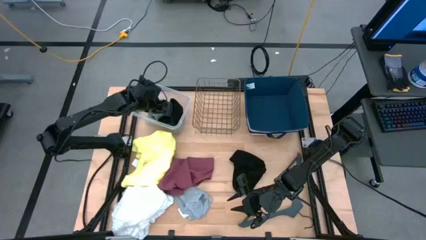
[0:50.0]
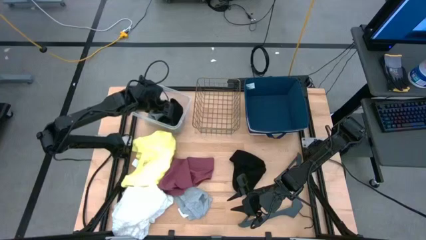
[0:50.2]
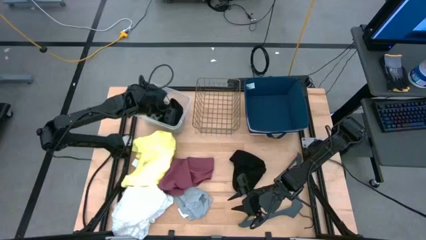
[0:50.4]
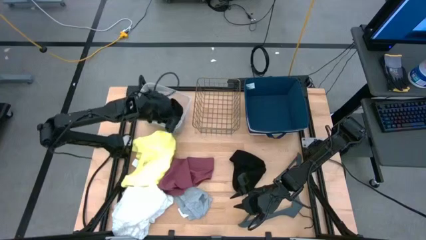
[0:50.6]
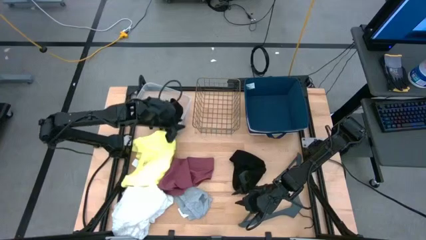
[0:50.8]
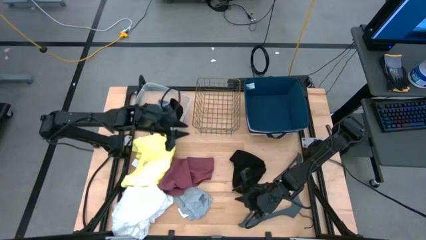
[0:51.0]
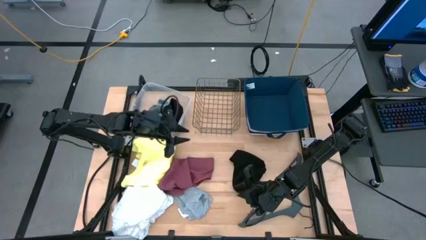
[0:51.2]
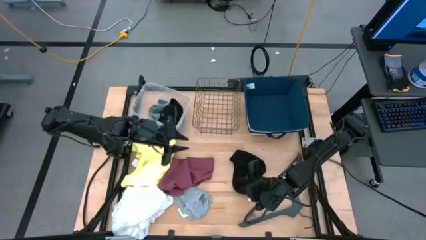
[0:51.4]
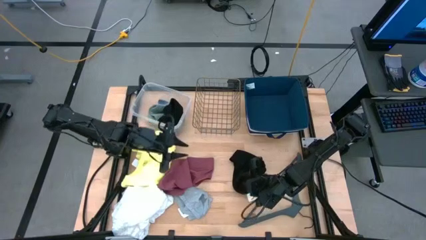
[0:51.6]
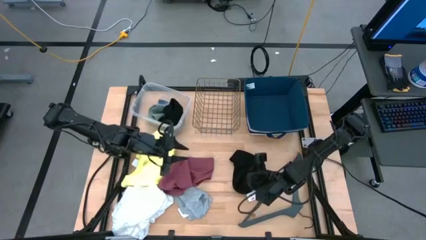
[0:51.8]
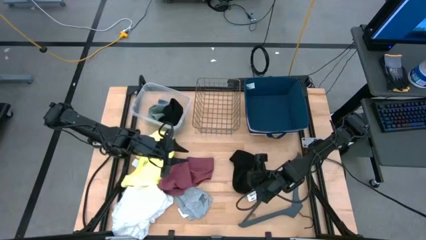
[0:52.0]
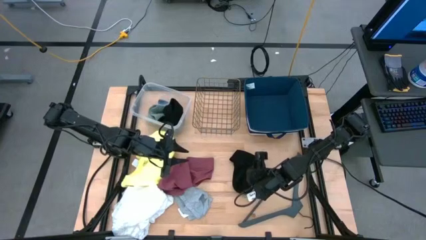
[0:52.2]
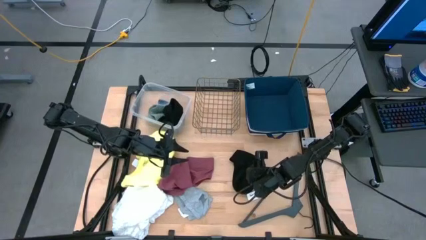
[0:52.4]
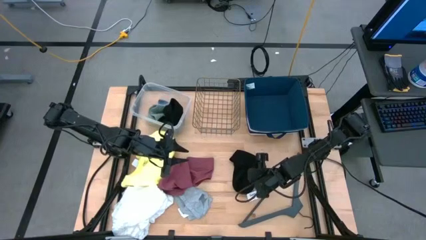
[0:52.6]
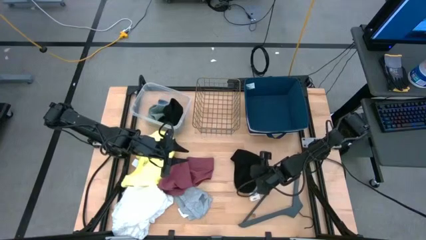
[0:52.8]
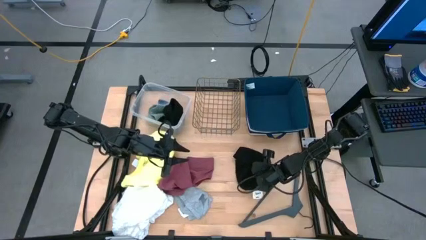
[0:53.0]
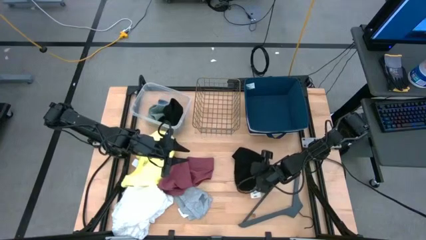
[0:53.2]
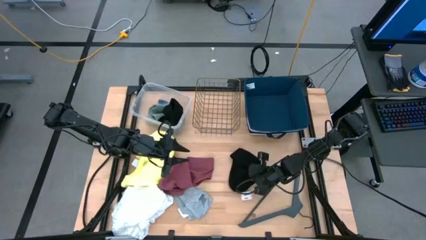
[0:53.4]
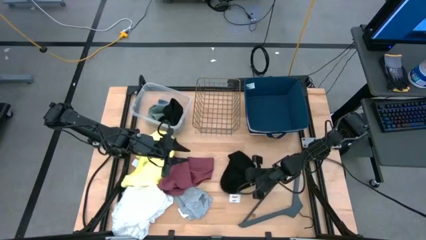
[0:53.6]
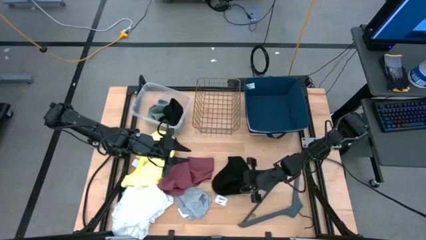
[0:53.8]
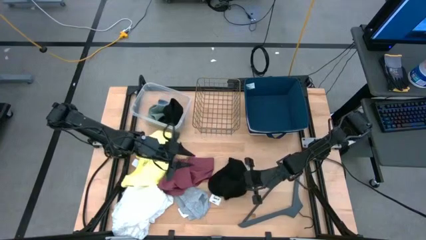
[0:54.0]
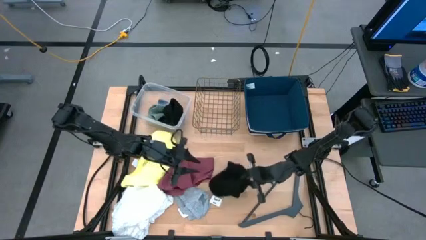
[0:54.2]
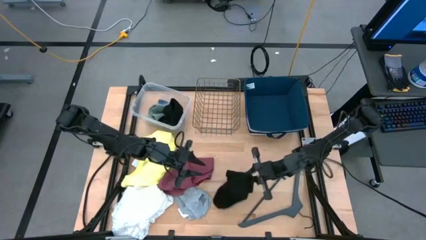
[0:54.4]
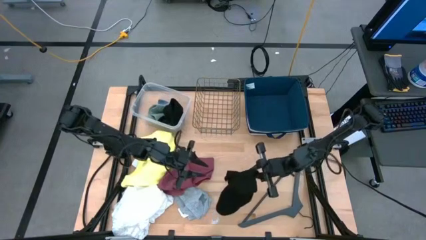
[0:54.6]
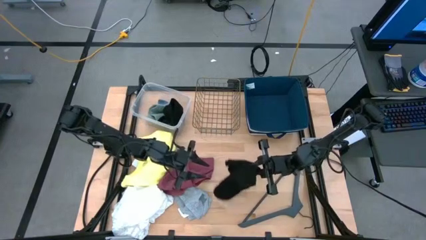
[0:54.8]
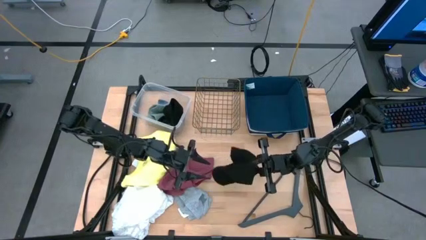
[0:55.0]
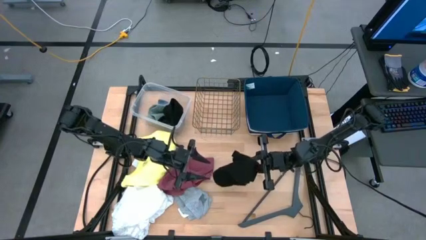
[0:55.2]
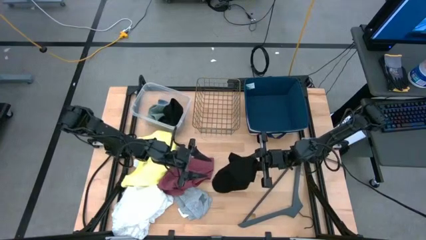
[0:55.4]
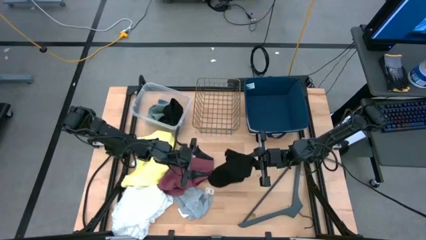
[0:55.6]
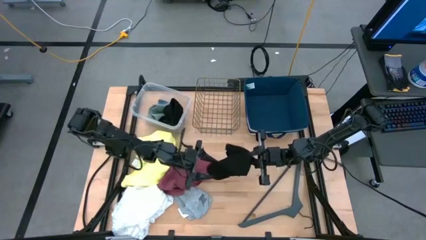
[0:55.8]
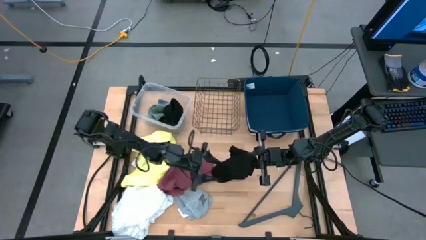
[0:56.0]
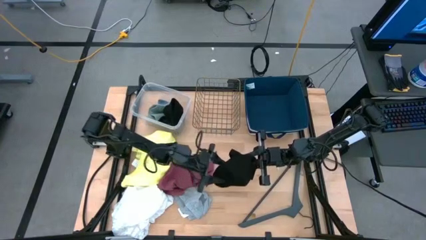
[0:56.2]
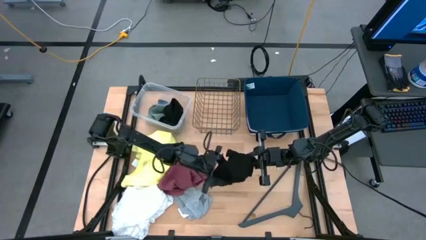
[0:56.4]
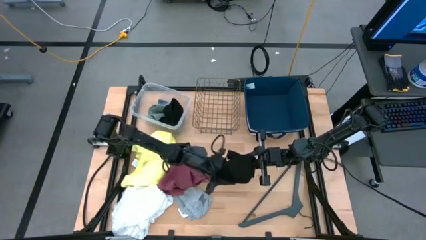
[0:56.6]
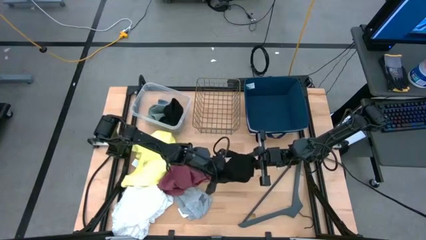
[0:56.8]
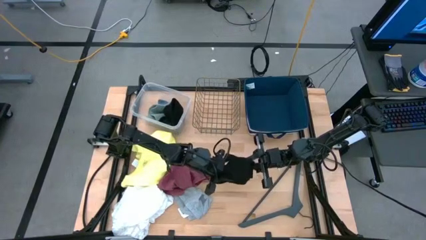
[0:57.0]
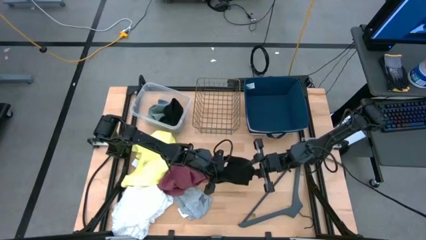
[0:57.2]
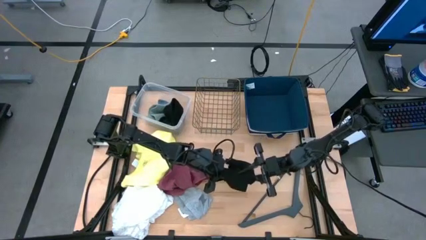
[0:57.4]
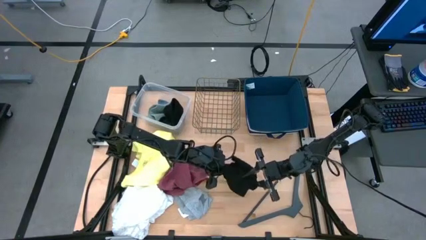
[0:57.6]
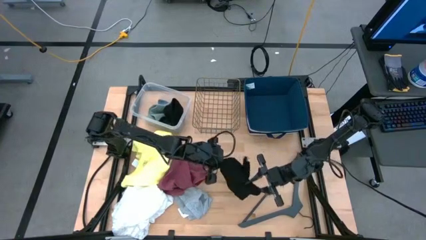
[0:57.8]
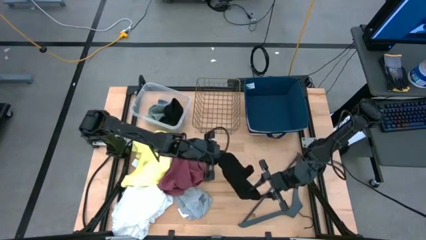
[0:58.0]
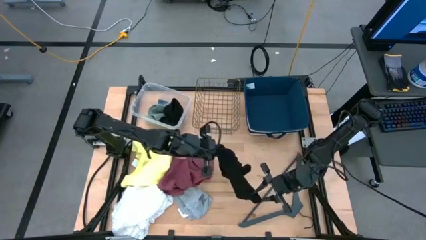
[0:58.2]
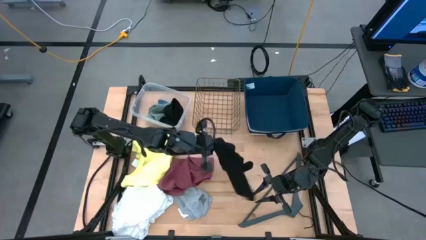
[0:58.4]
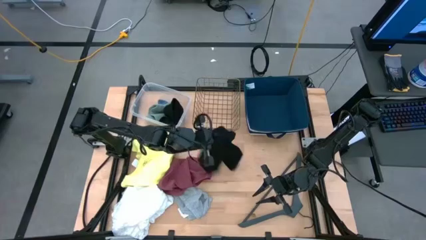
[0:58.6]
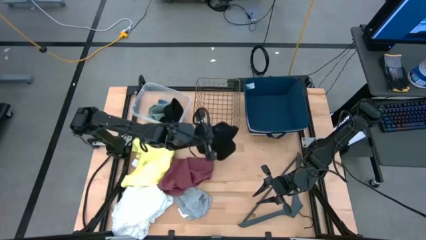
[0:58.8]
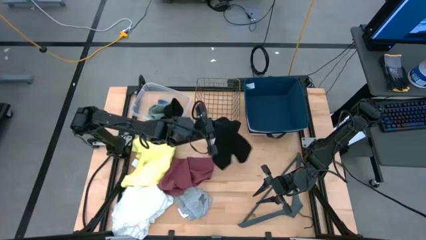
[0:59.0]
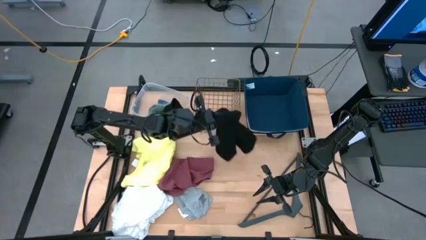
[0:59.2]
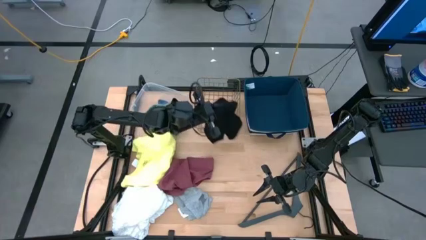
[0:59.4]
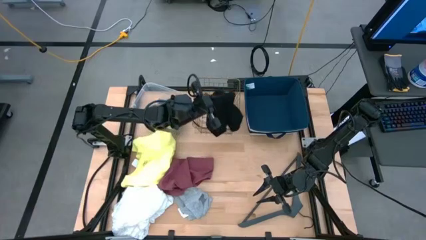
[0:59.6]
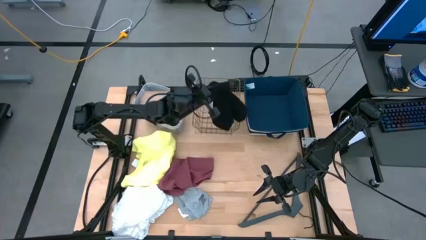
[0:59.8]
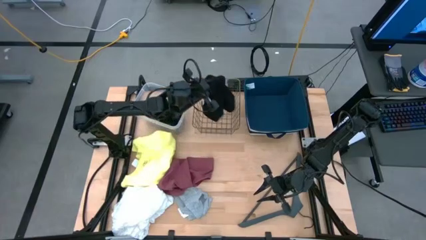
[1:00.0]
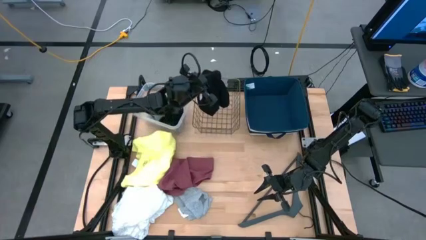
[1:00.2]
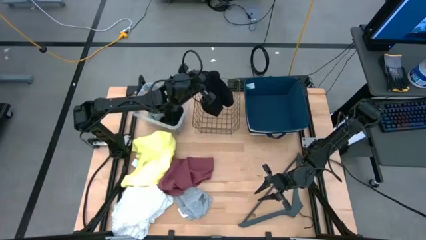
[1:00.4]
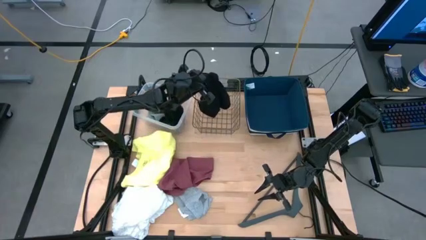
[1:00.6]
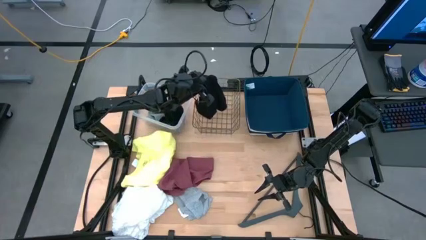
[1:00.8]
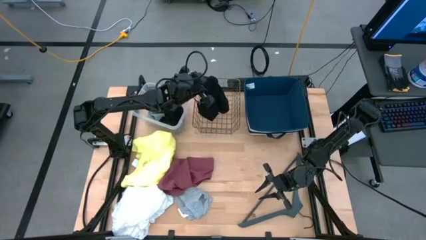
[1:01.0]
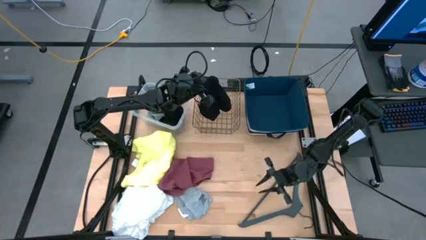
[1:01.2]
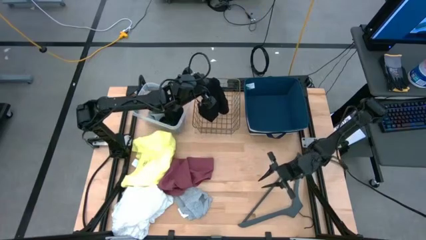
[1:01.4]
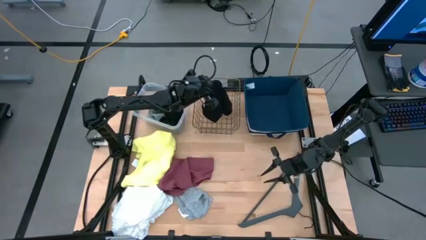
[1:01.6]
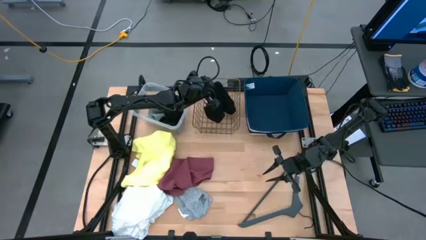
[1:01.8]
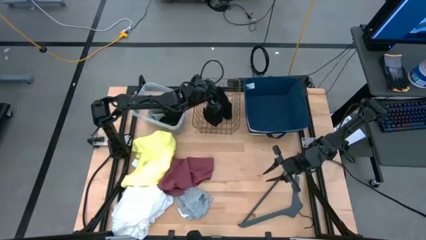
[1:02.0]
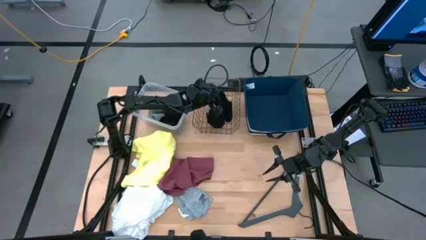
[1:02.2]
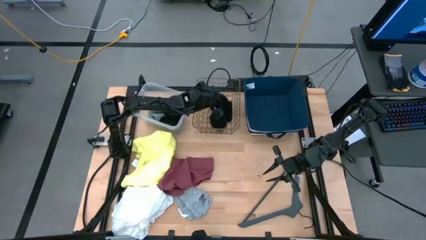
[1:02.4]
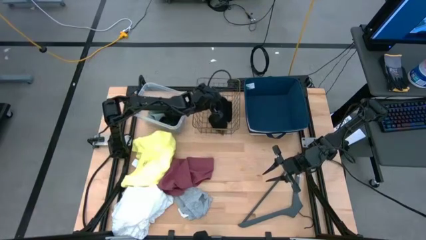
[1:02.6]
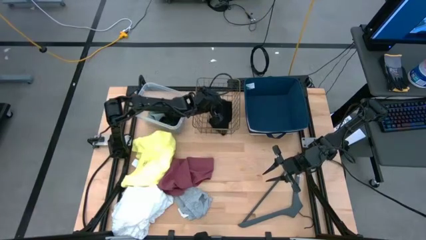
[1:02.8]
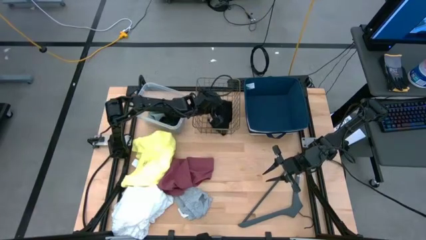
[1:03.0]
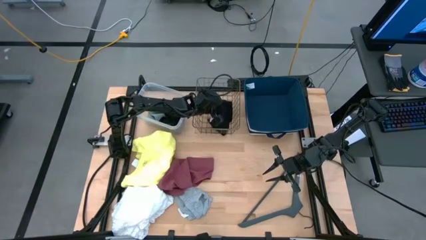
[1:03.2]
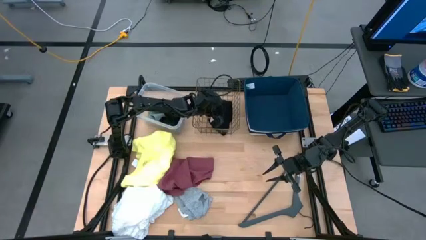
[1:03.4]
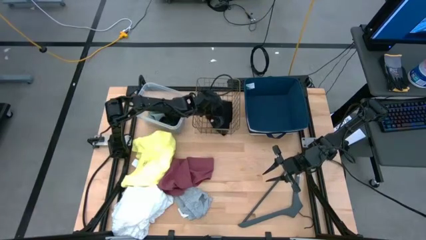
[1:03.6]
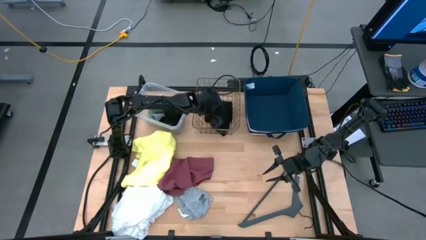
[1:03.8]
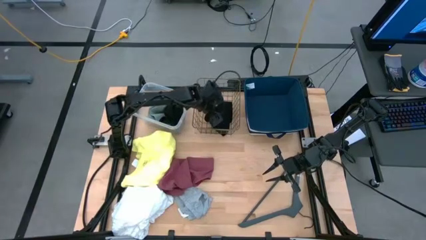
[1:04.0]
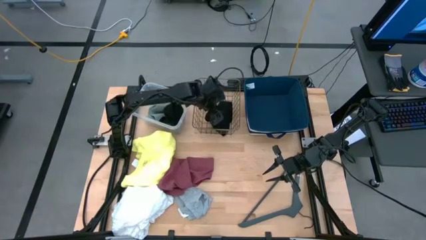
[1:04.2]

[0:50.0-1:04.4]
Task: Pick & Place Cloths
Put the black boxer into the wire basket

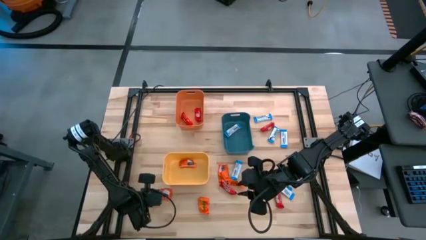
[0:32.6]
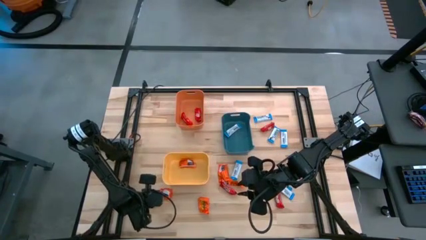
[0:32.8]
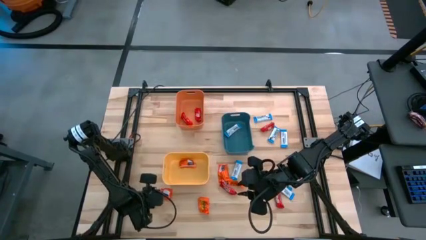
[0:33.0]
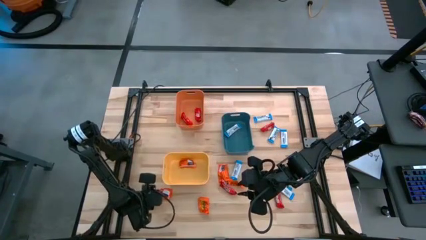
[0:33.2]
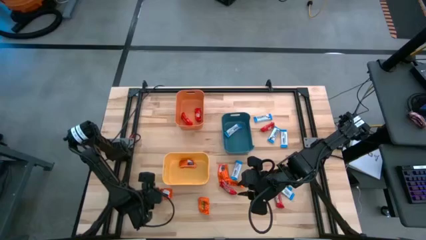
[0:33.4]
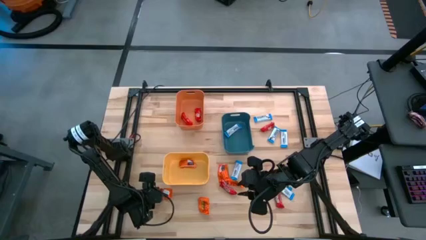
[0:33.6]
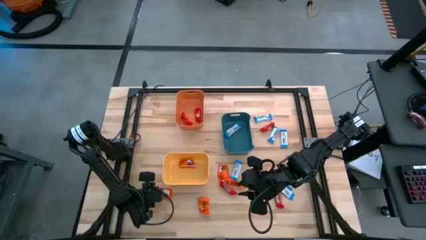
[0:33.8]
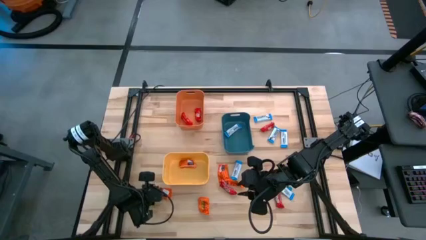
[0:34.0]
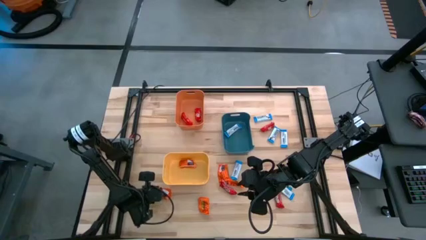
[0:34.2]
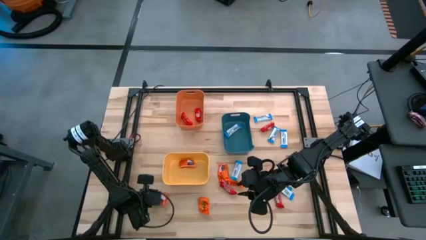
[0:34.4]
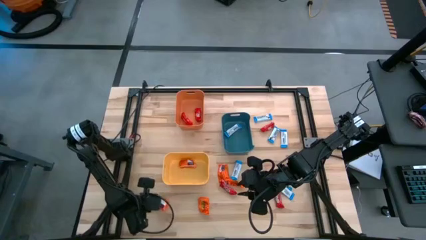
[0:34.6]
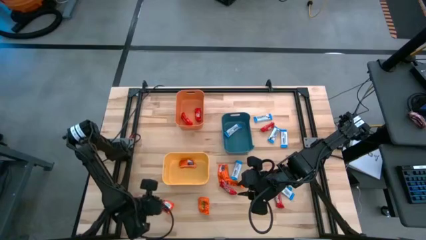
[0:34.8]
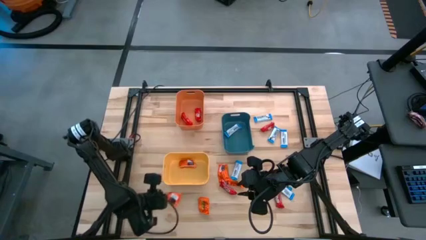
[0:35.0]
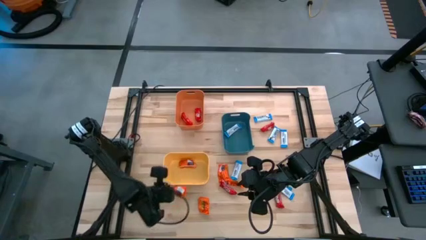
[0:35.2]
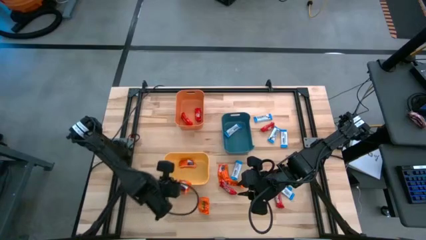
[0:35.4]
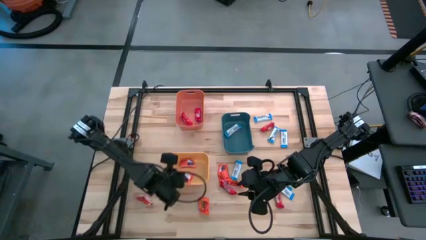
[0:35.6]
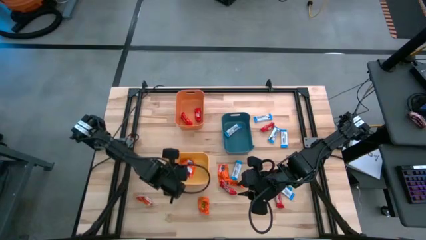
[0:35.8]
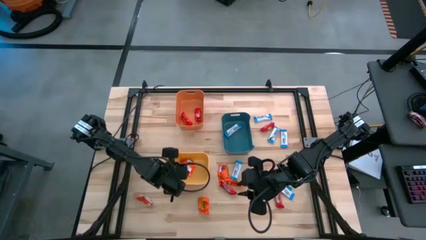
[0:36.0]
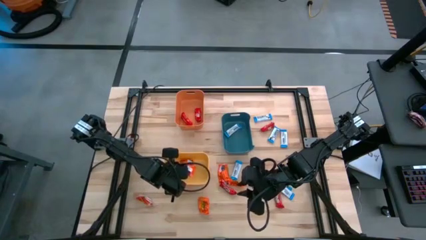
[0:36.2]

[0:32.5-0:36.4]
Task: Organize candy in baskets
Put the orange chocolate into the yellow bin
